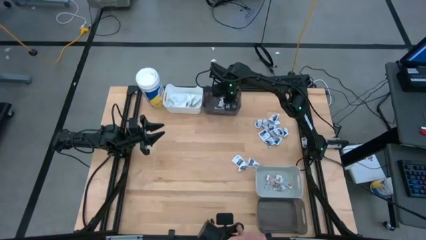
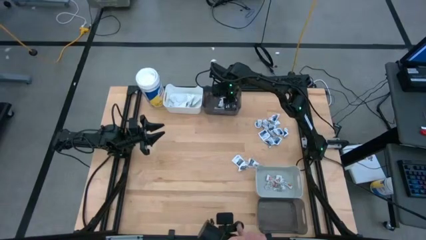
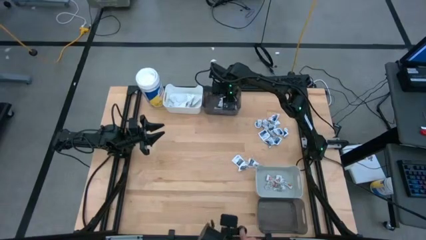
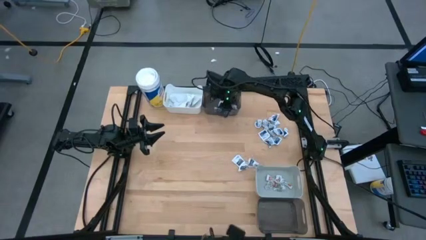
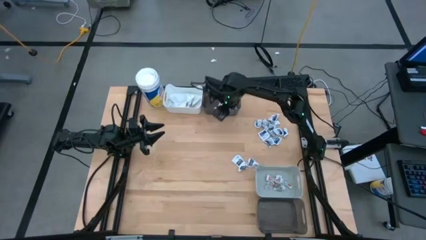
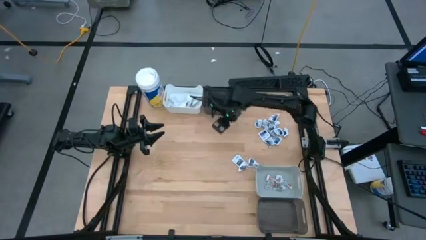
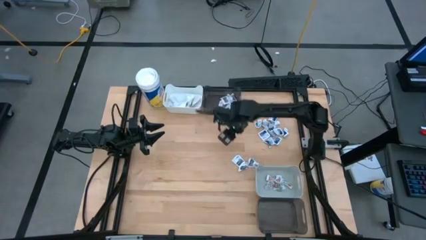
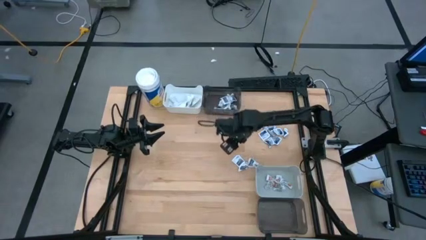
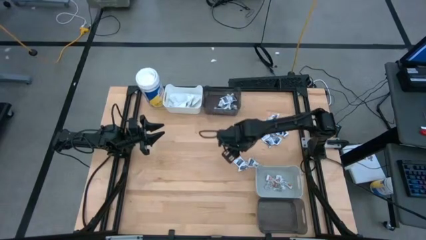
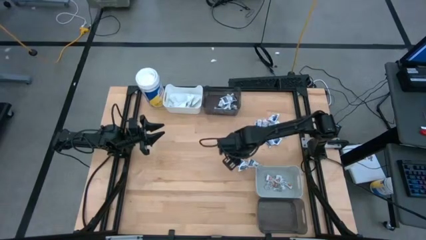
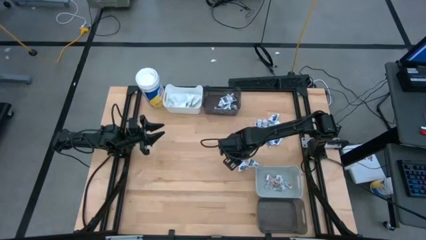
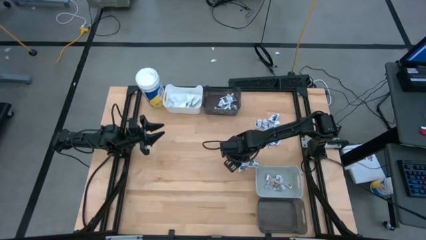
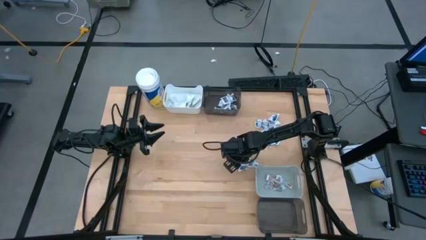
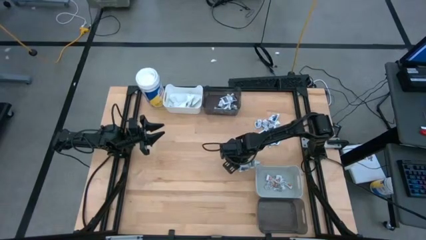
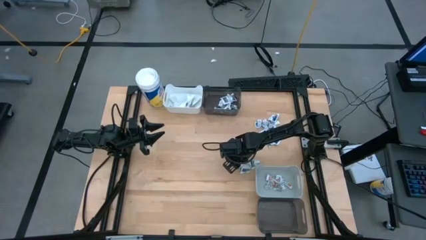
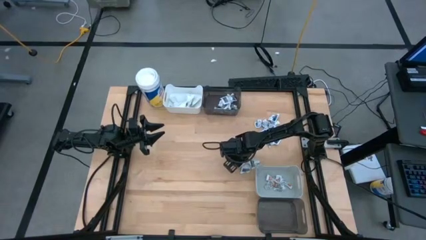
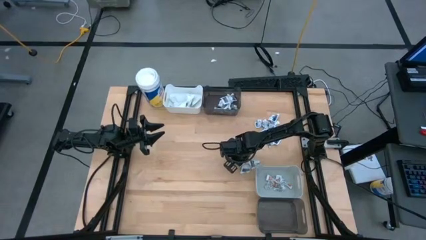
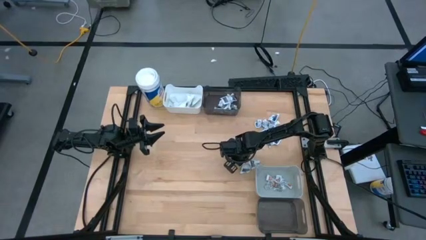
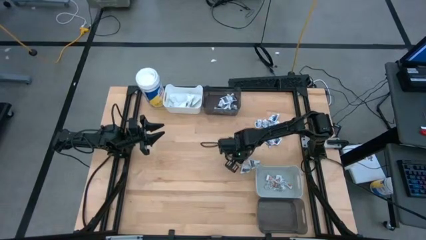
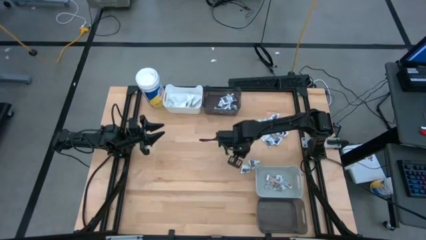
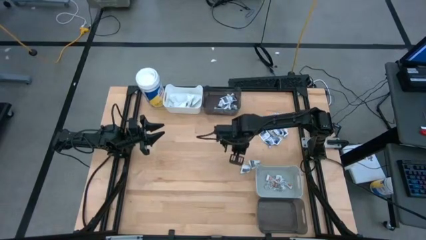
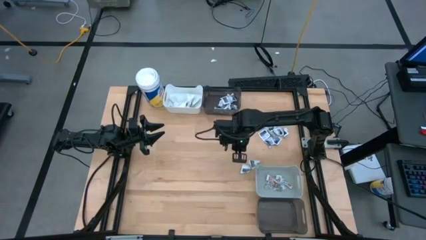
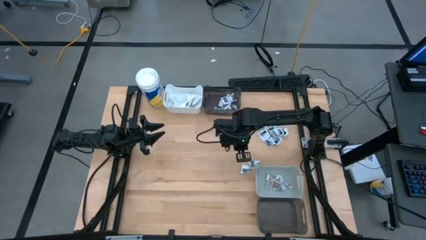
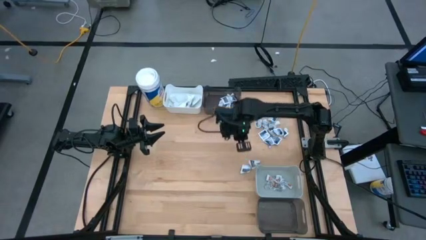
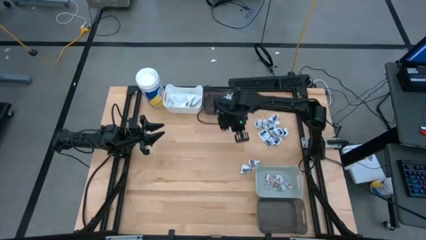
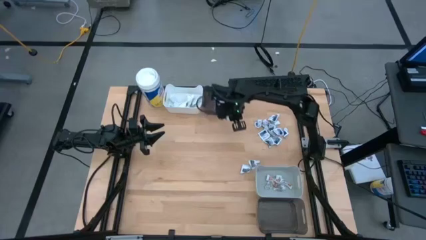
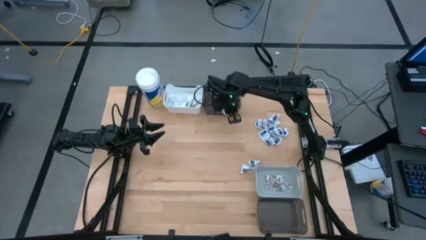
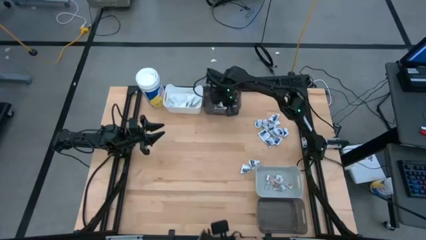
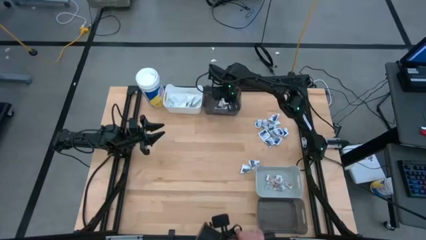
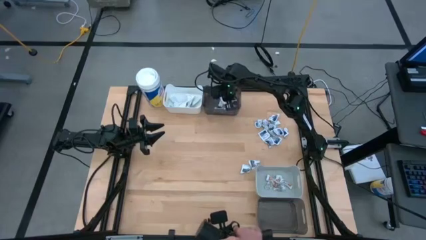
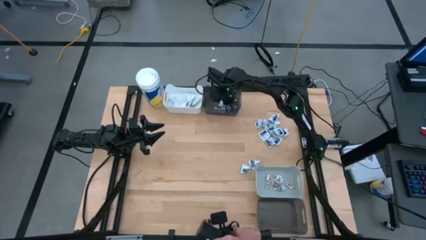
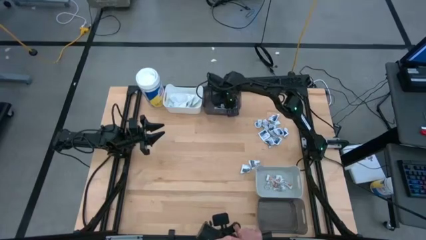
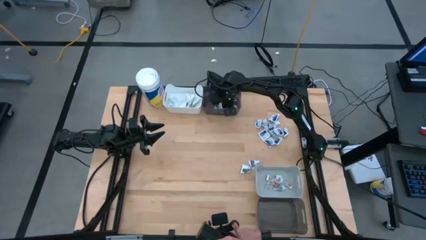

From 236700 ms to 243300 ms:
Task: Pick & Place First Aid Supplies
Put the gray towelette pack into the top black bin

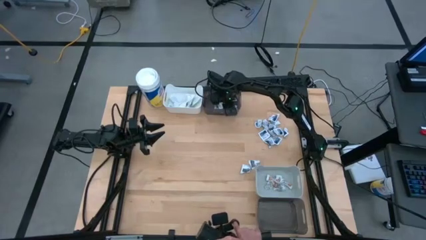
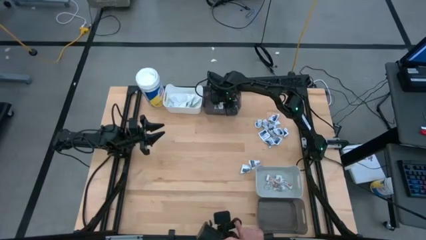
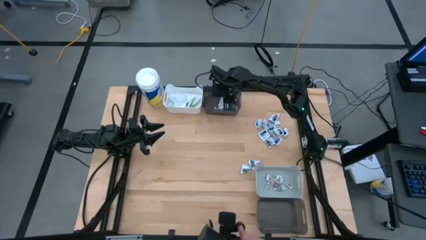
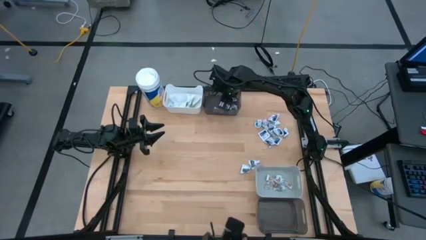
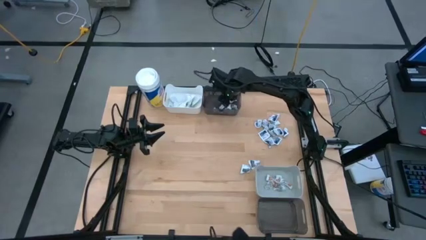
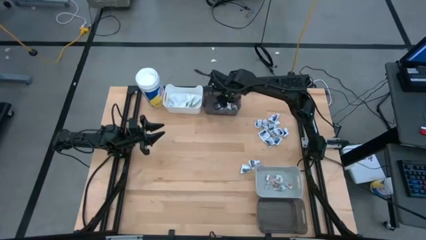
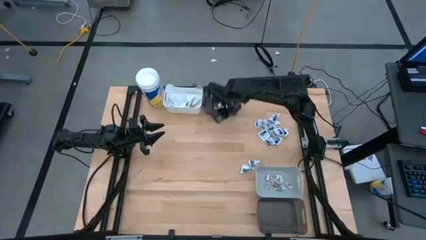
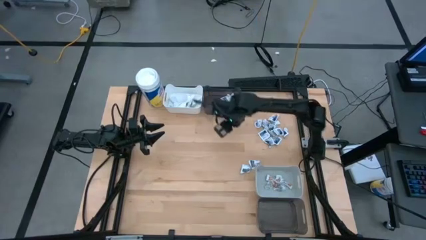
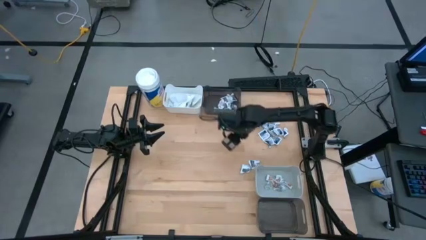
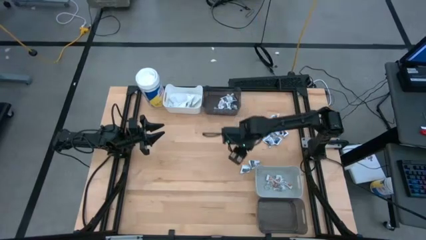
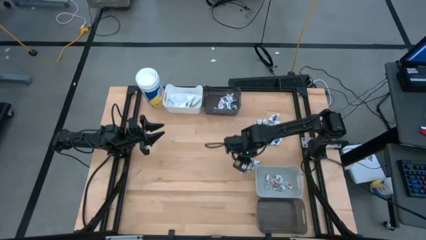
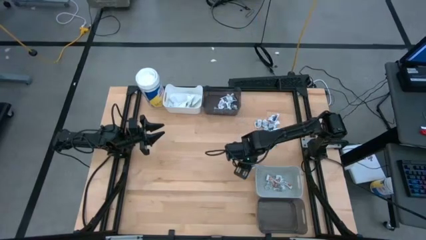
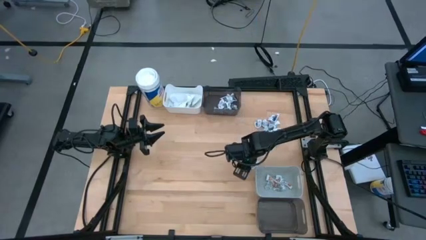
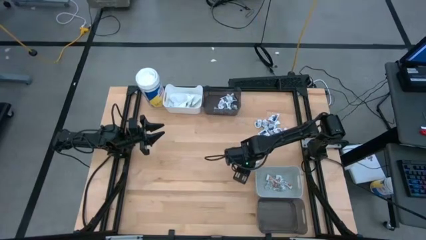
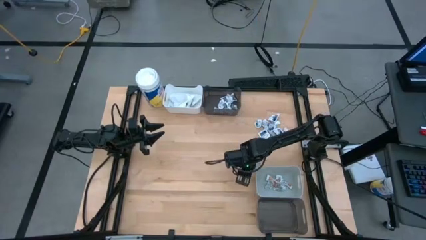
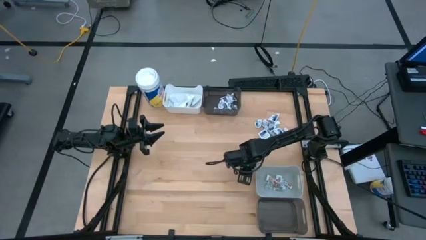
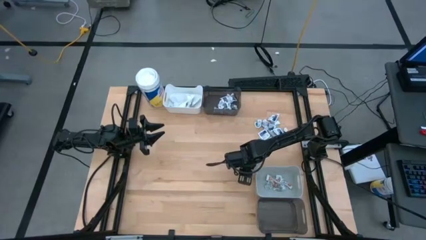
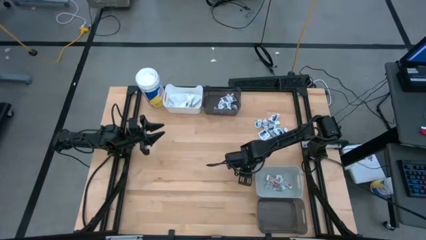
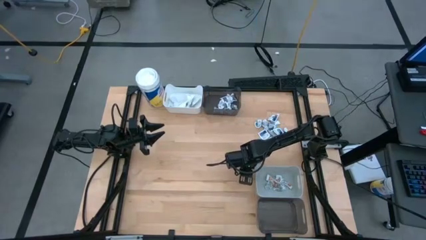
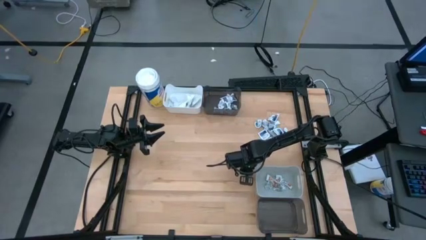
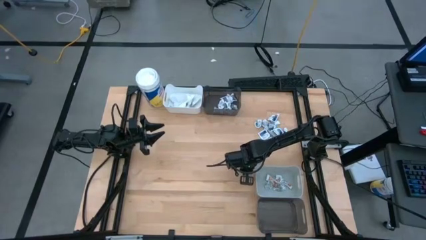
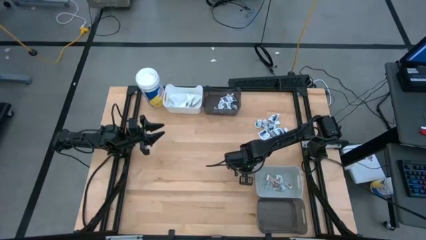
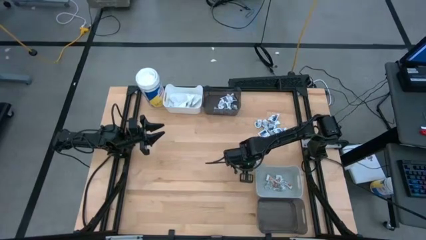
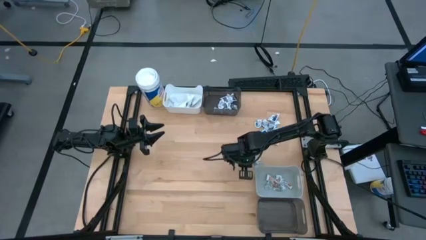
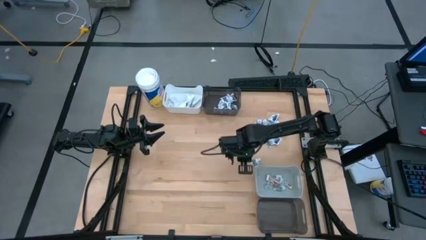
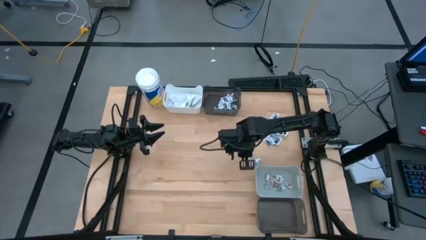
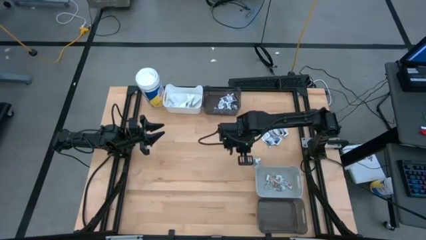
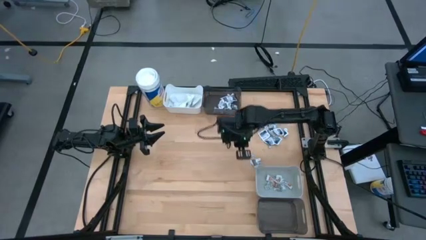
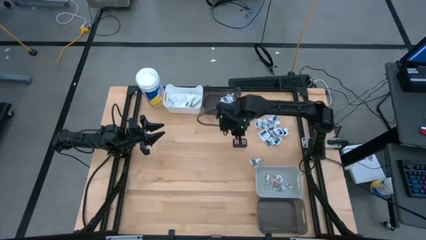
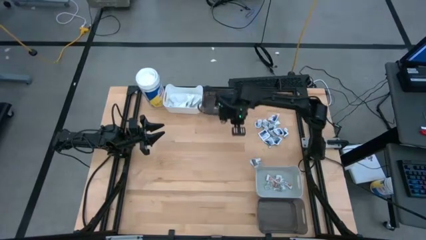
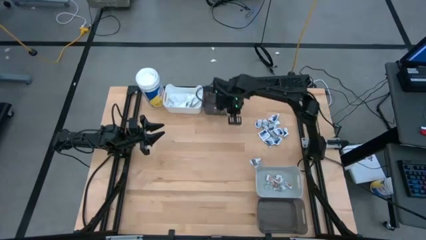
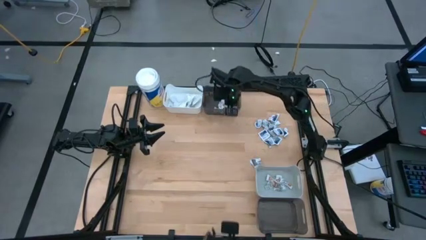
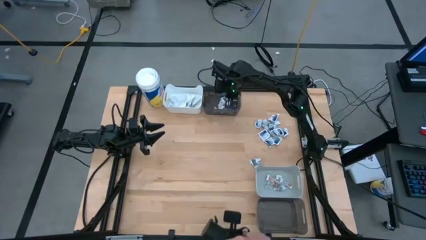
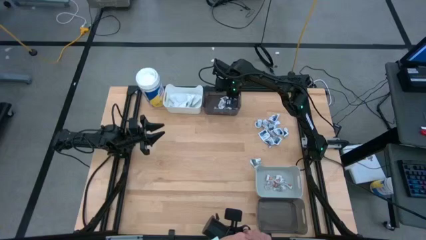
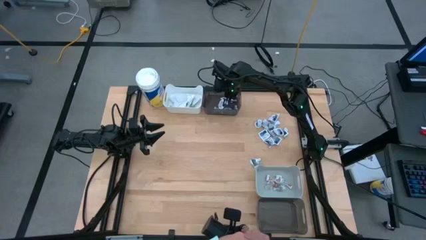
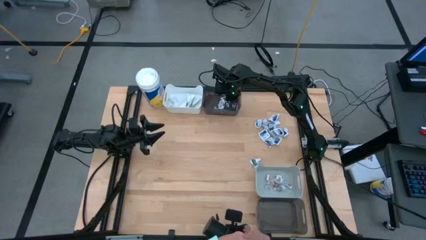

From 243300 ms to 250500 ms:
Put the gray towelette pack into the top black bin

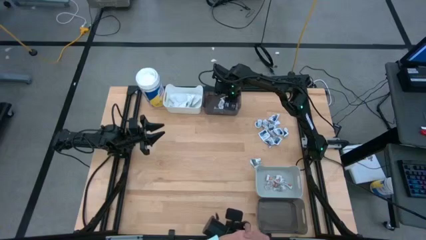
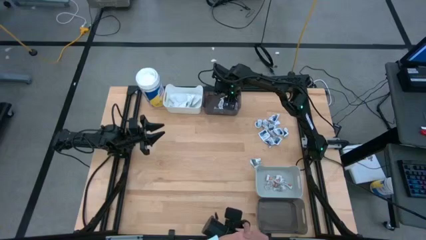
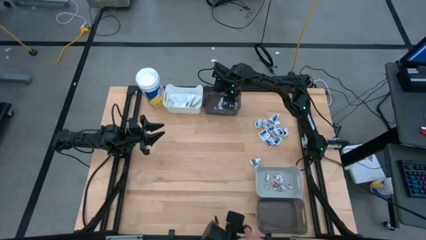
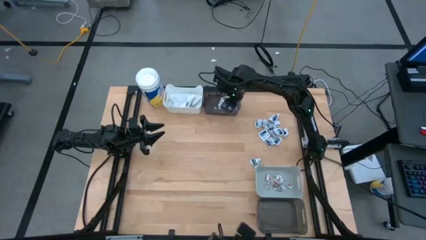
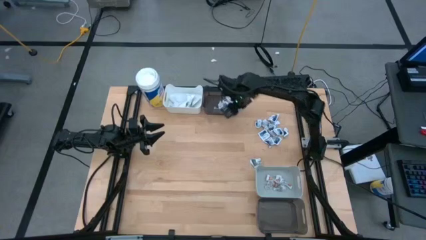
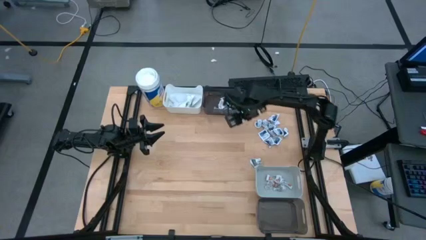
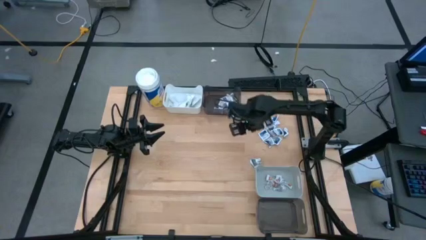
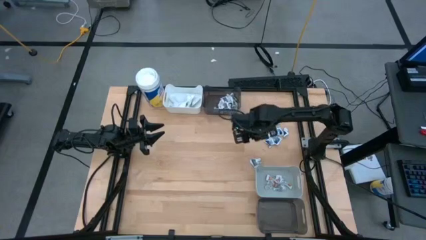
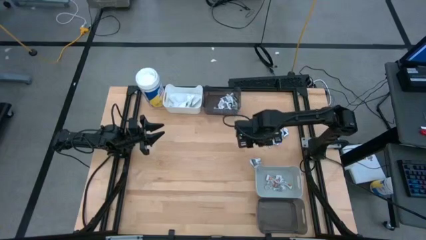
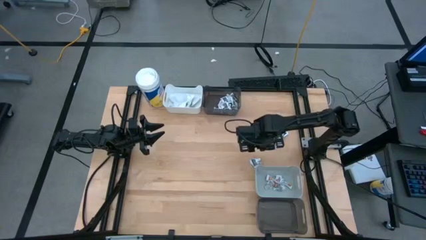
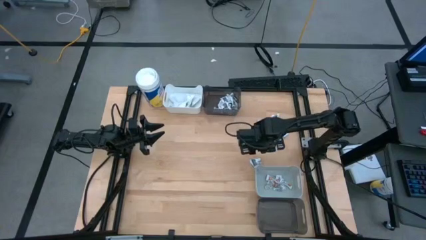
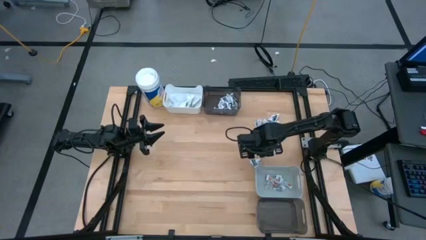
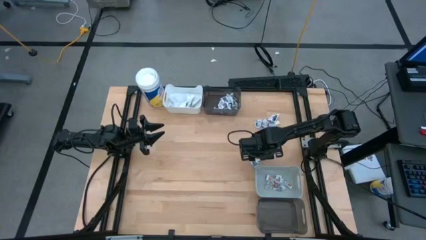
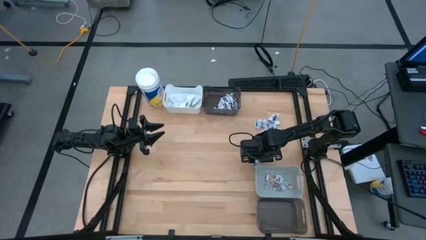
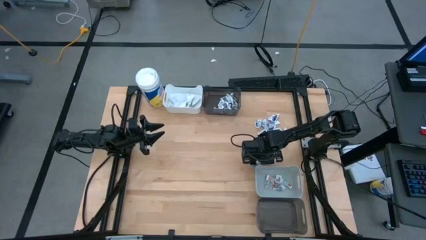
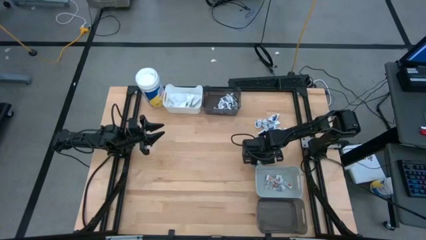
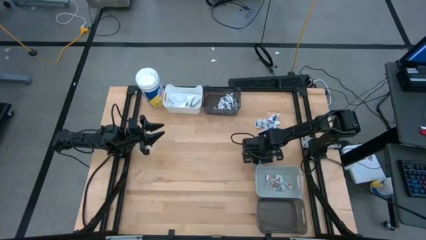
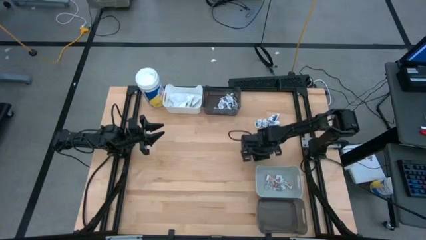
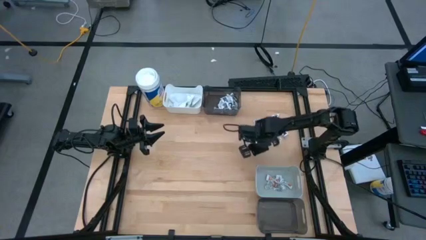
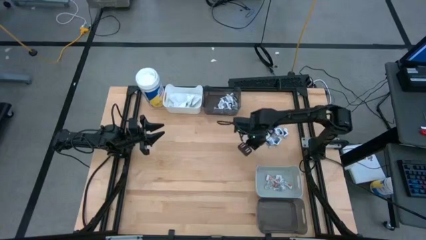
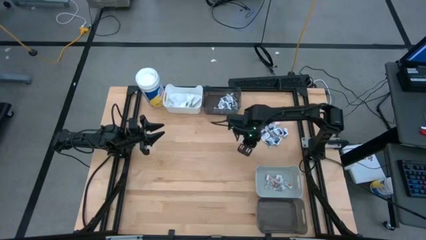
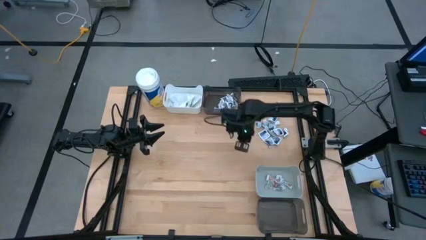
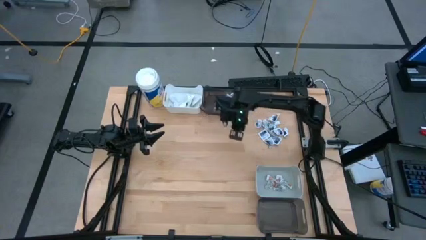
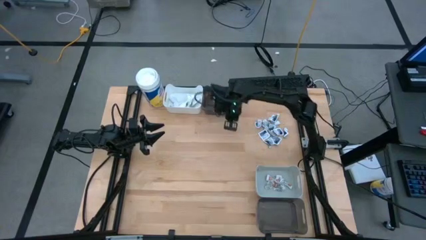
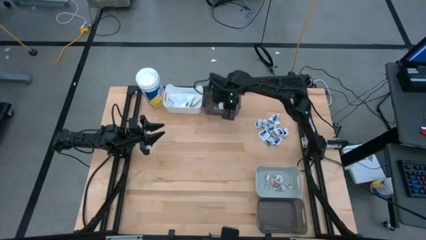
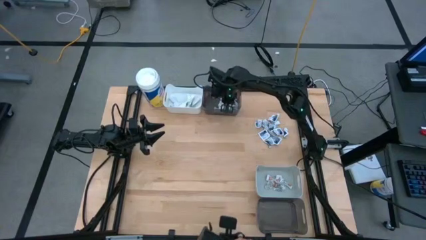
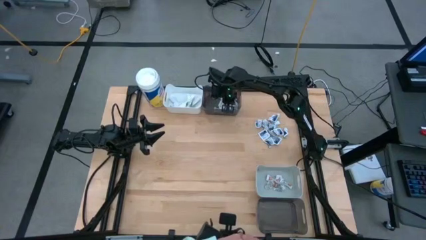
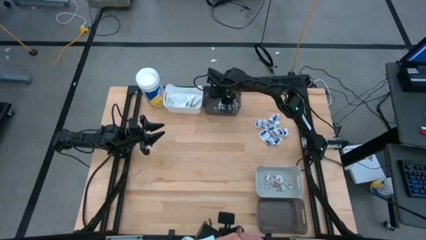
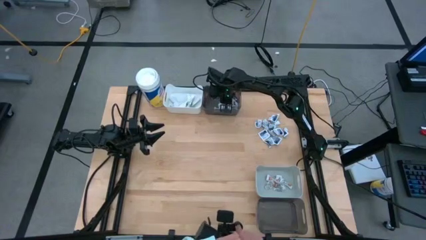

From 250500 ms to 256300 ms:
Put the gray towelette pack into the top black bin
